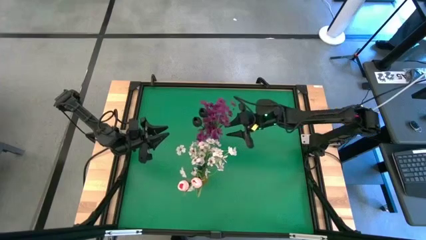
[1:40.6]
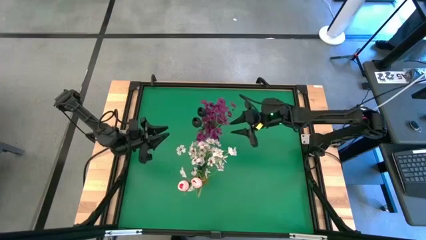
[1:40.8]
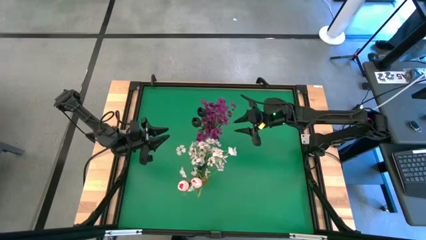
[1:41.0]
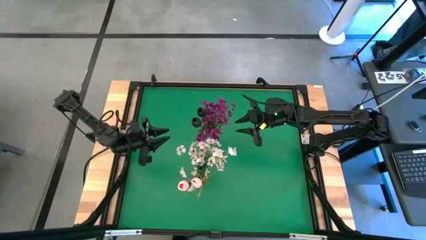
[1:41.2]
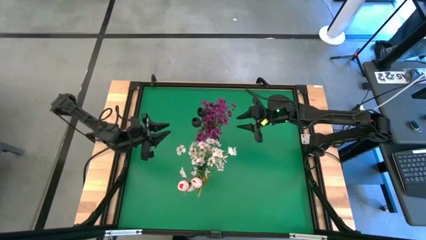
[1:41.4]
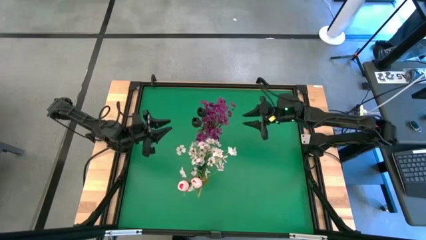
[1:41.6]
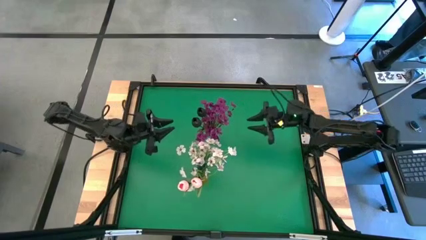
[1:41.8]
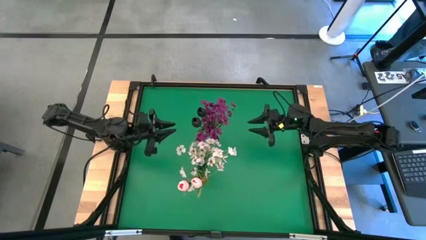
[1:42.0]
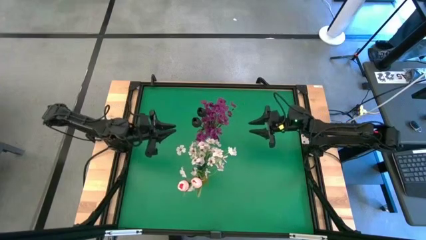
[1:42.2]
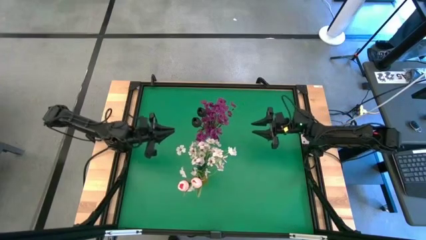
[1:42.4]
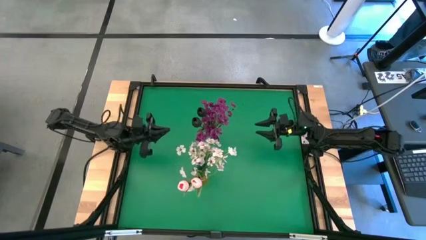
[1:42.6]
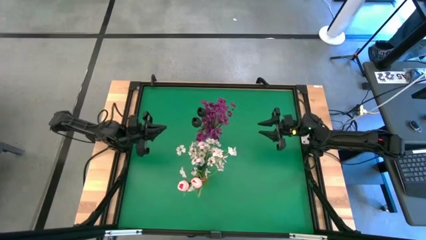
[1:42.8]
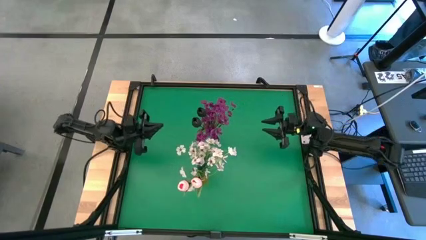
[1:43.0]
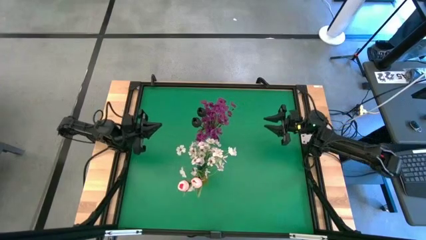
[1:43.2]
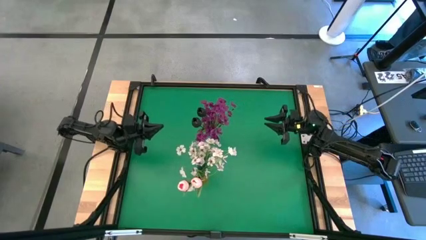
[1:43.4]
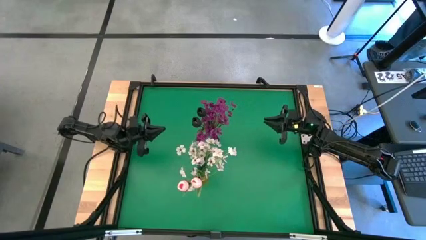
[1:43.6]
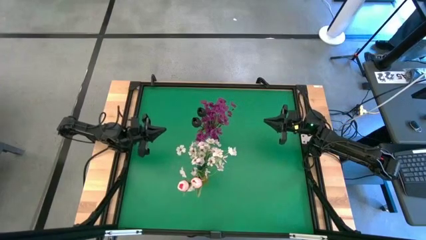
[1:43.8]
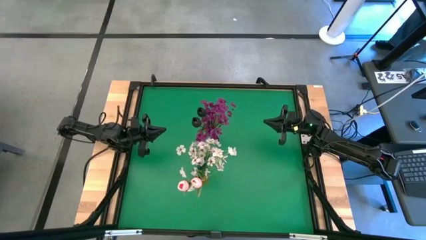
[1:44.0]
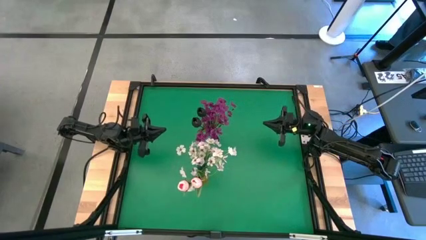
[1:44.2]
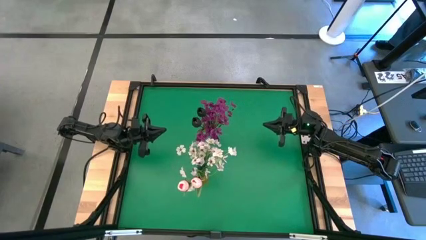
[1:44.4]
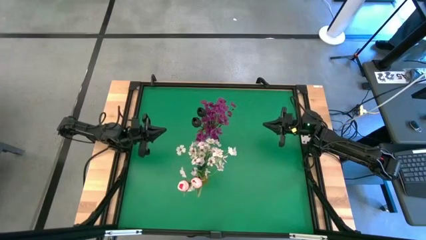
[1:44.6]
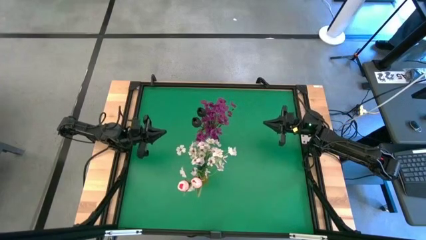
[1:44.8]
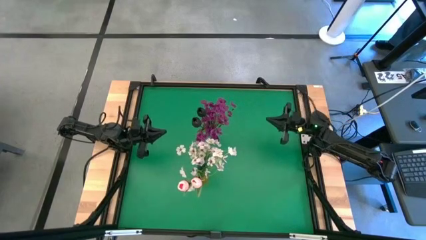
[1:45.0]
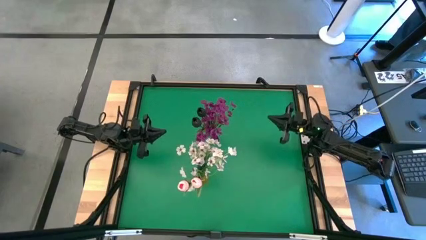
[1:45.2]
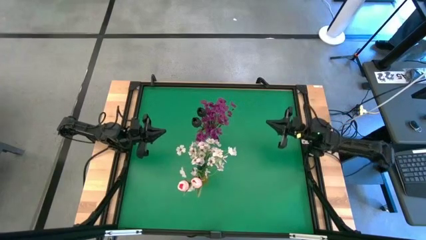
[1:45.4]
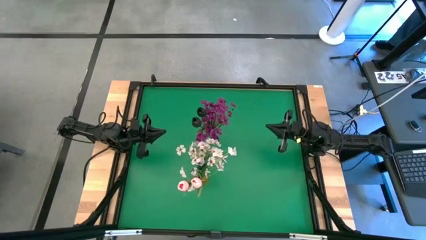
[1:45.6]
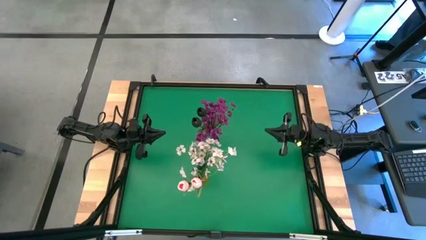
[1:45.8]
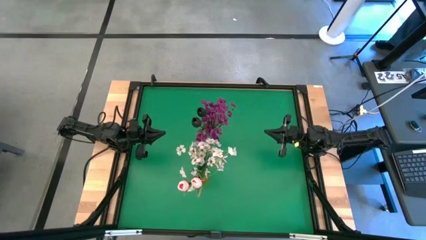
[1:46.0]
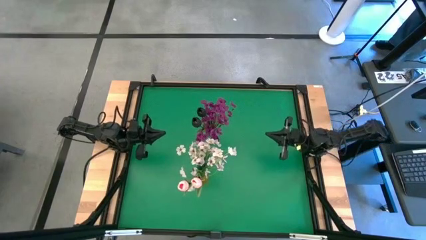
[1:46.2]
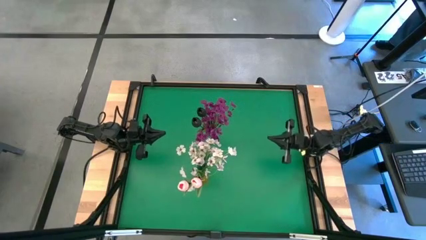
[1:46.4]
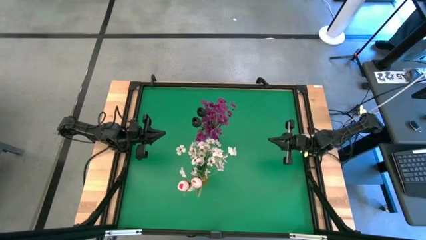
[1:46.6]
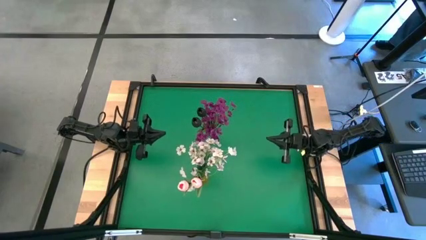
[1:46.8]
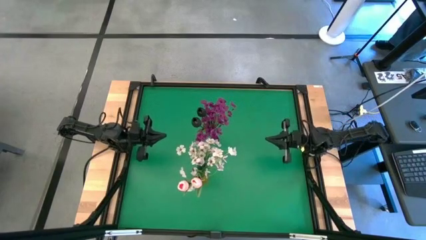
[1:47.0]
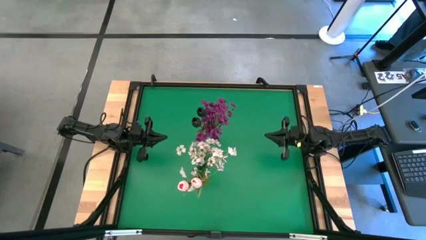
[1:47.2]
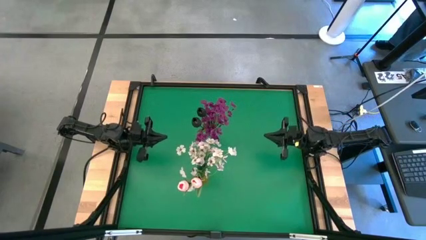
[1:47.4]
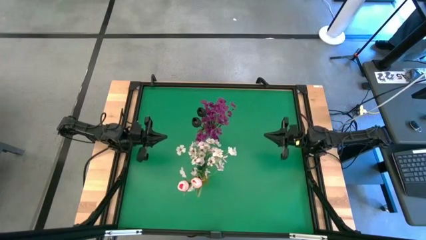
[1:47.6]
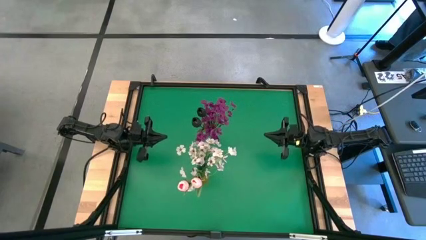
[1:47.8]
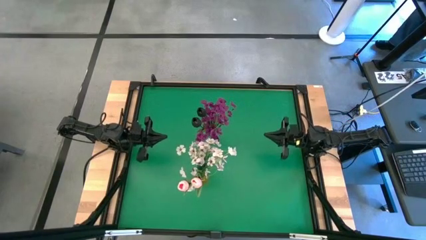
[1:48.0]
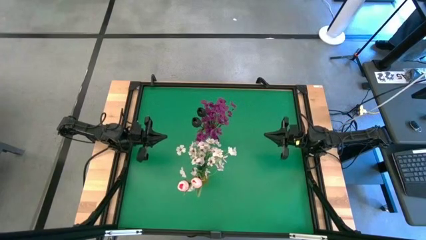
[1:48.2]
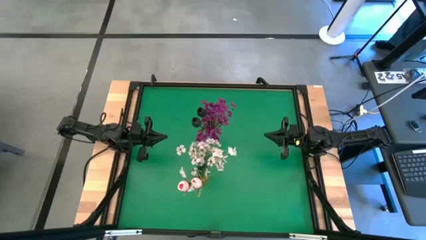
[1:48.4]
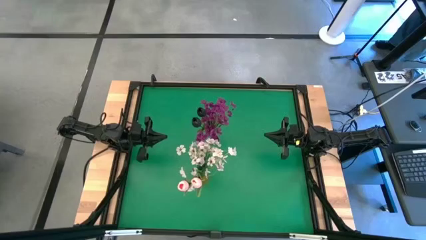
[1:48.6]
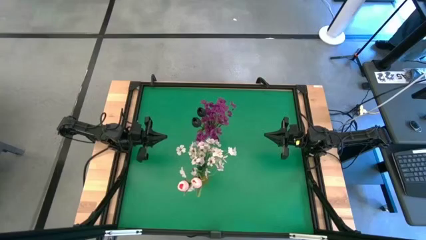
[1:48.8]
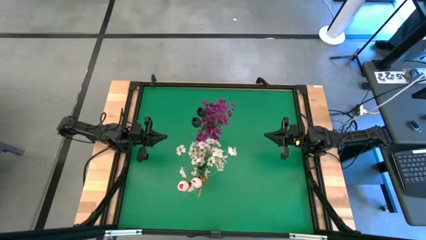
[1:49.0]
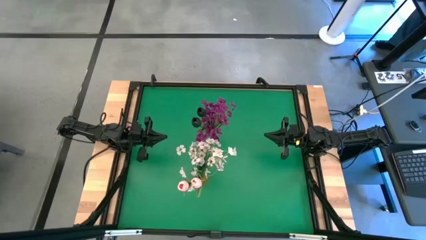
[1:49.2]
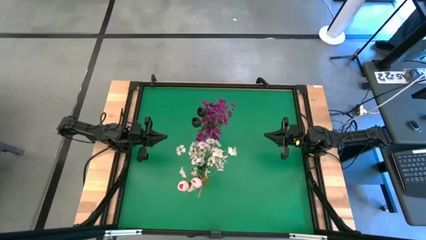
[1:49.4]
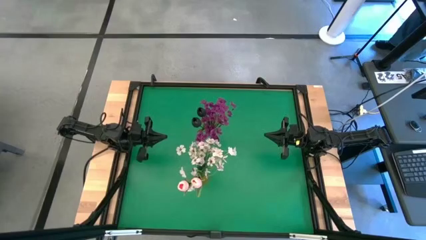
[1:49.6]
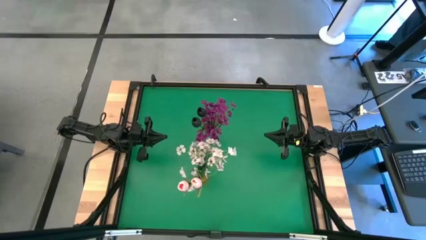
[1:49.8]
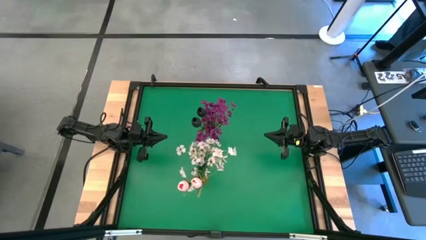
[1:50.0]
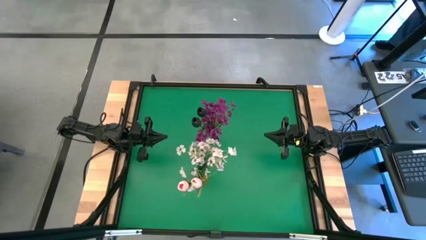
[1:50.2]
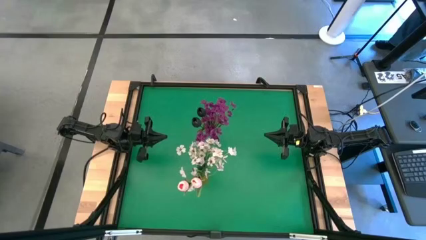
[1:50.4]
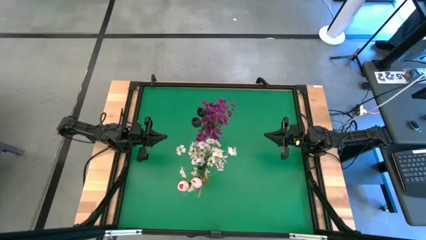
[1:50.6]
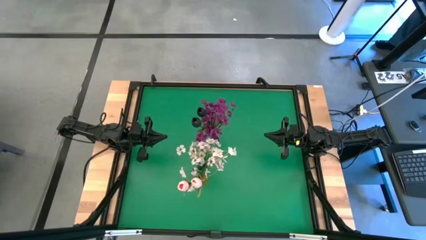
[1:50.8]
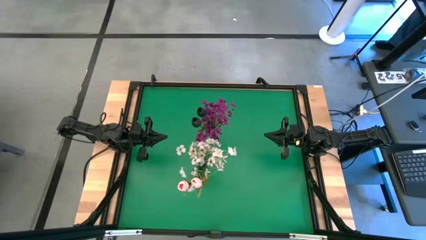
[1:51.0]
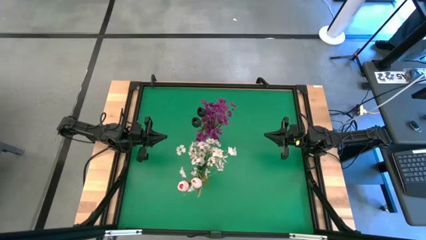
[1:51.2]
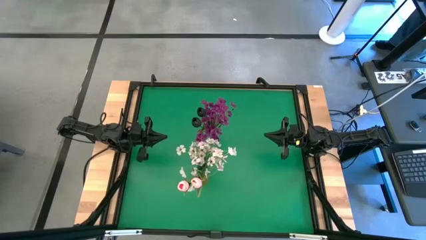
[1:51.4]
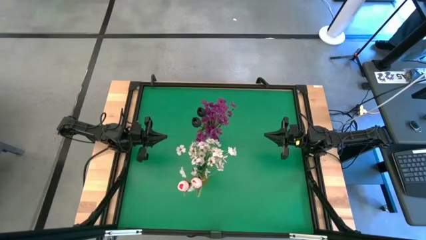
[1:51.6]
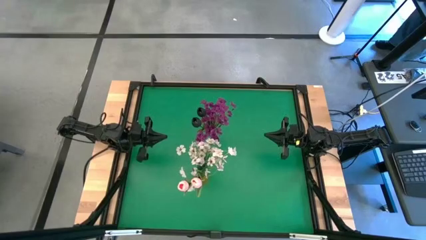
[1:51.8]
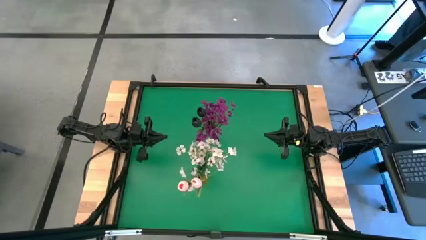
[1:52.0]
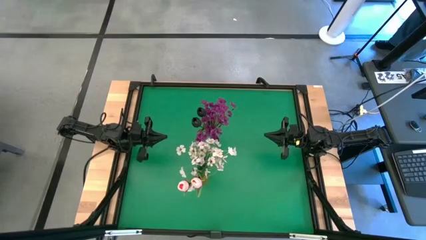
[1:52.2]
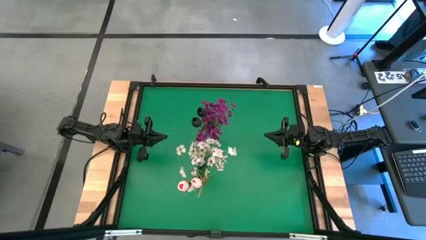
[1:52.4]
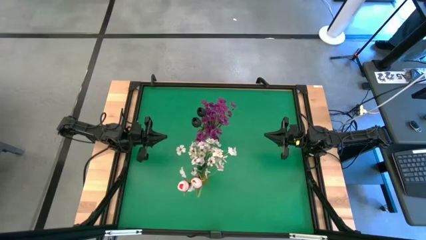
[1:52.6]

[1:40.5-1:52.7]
Task: Sort flowers into vase by color
Return to Home Position

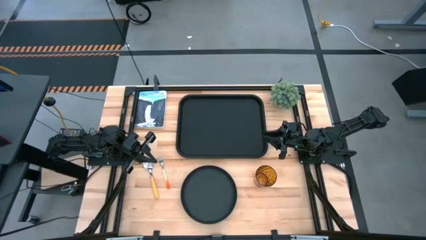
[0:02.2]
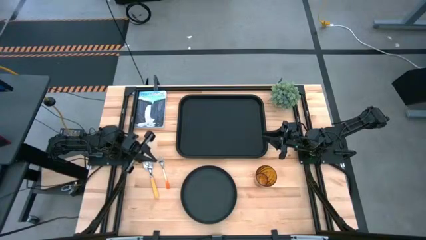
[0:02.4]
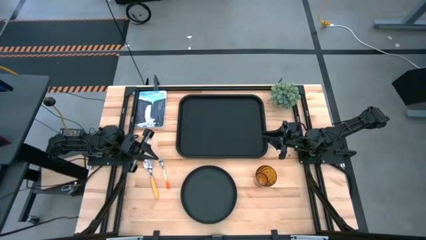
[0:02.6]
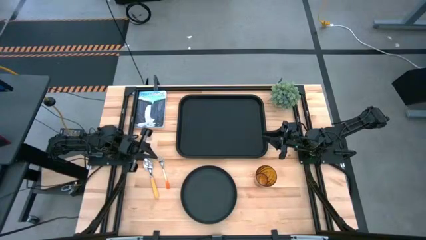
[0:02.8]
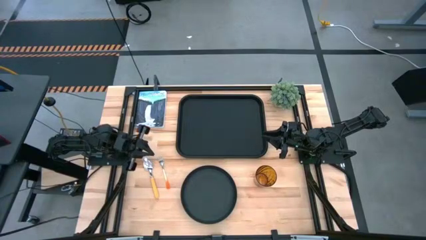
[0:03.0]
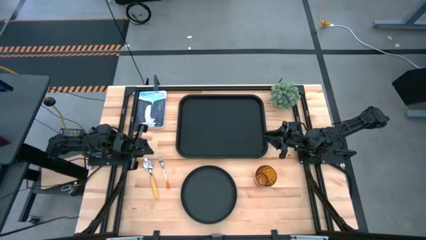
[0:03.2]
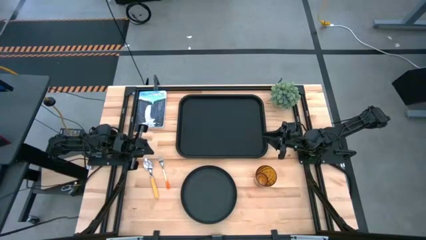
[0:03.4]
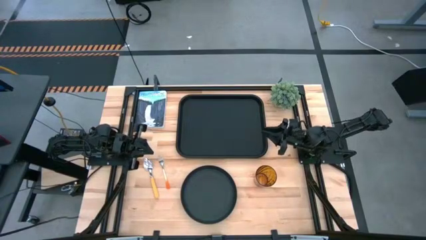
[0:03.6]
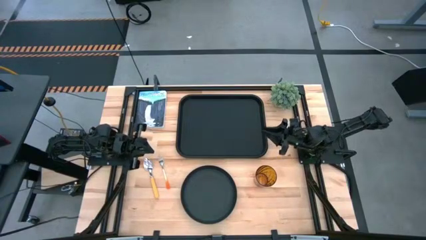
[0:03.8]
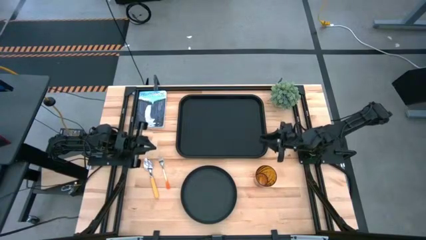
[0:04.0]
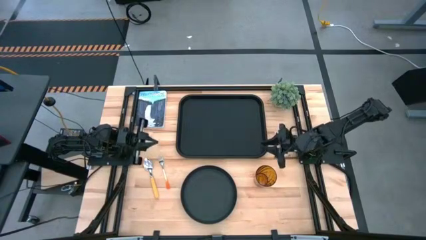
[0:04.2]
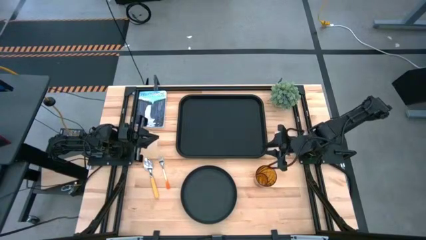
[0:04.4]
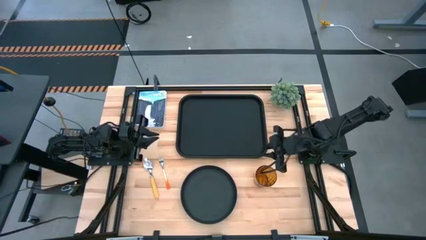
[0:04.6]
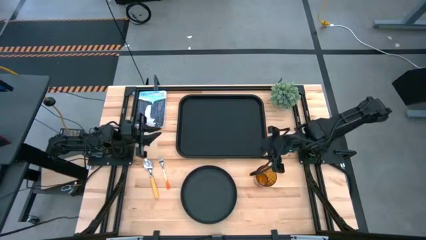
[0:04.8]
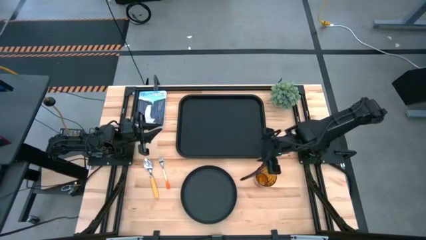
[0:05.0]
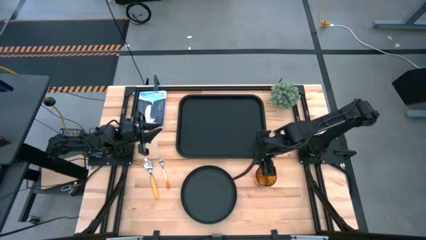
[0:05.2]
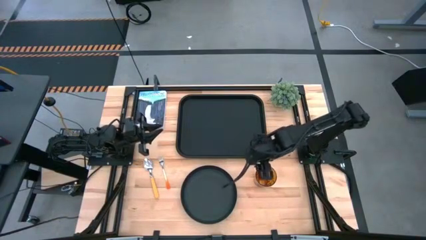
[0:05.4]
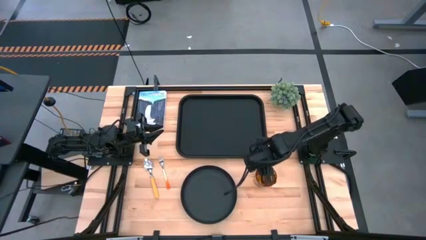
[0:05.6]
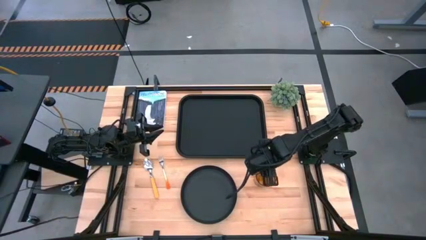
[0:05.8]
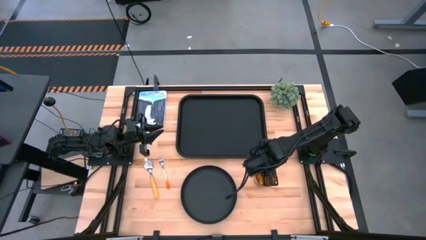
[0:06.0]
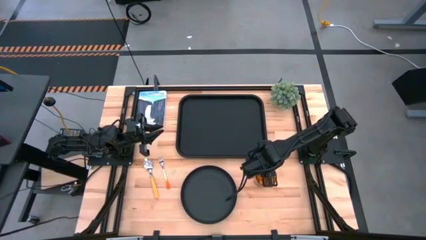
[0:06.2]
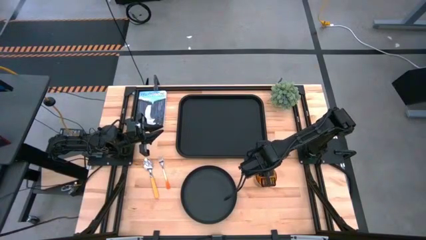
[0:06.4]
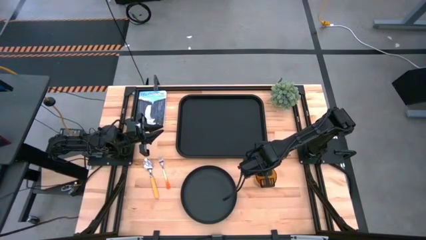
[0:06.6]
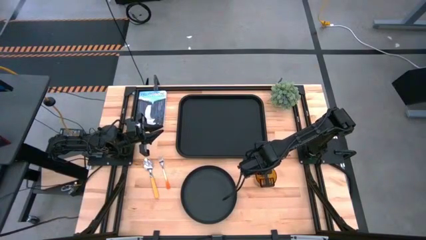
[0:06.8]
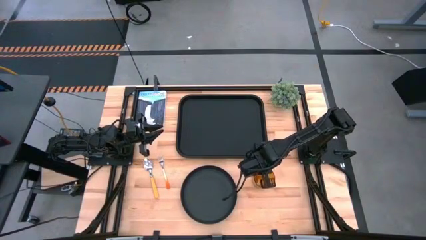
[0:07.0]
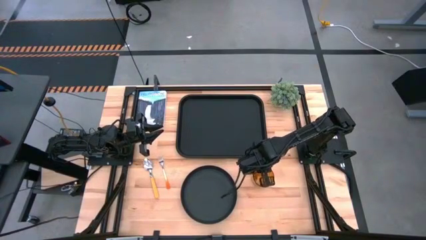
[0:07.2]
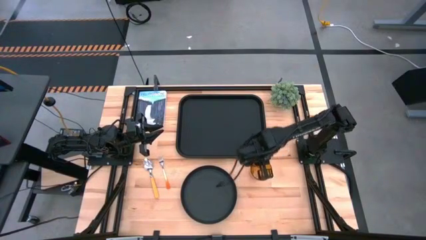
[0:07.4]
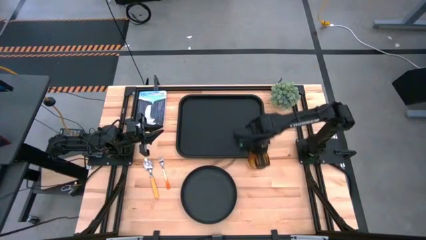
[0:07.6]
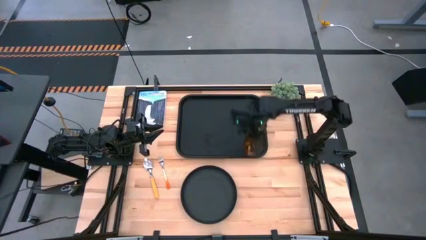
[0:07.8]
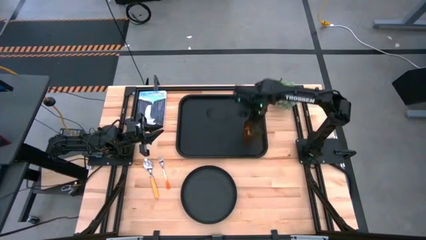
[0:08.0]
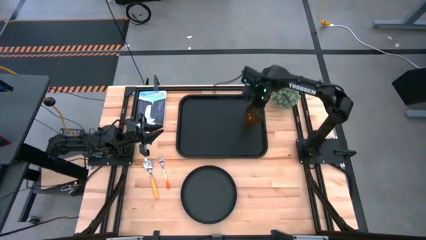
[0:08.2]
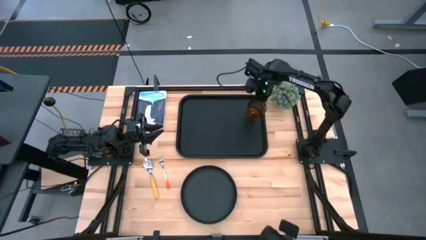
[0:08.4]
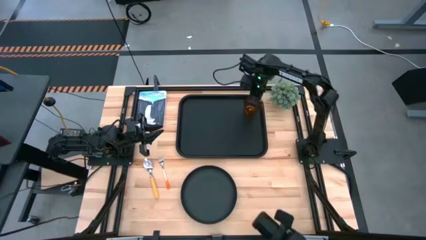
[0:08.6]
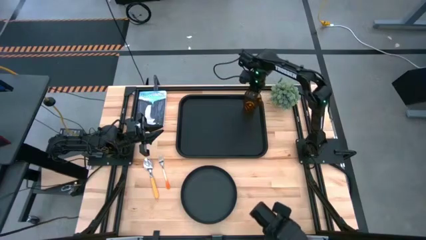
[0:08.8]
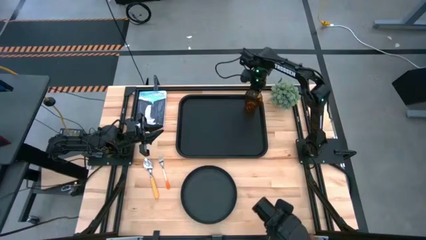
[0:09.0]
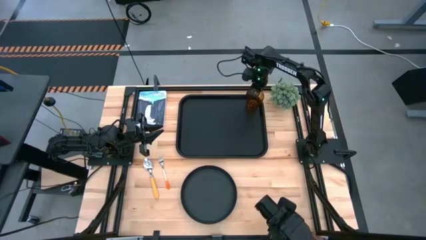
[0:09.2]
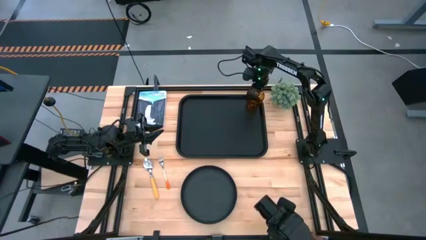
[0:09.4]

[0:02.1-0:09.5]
Task: Pick and place plate/cup/fork/spoon on tray
Put the brown glass on the top right of the black serving tray
